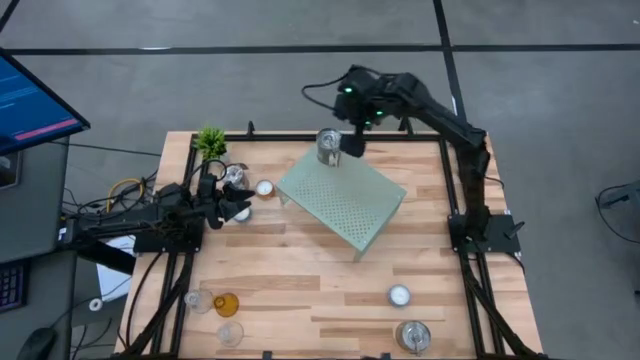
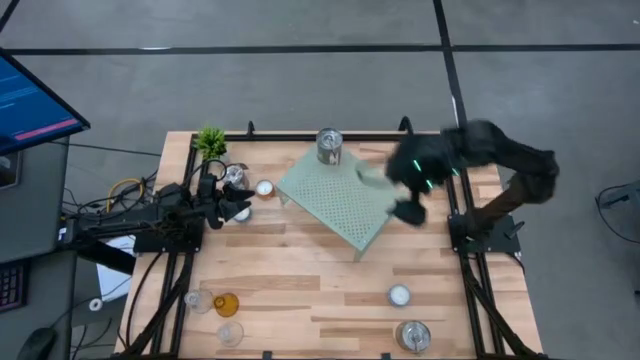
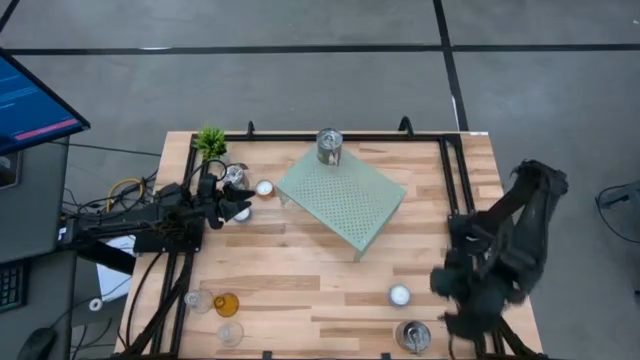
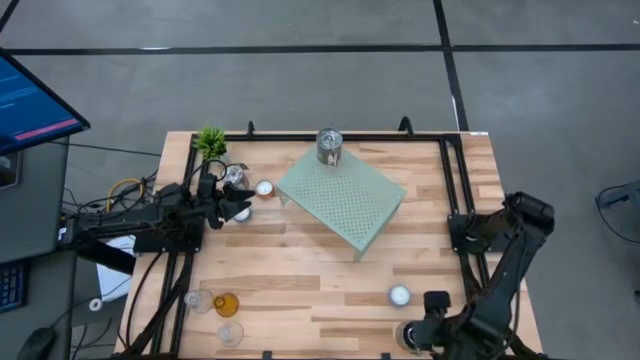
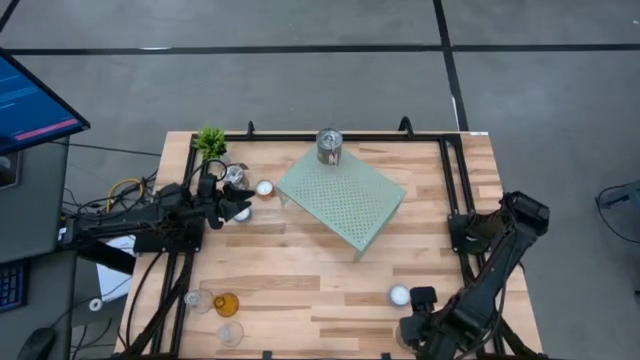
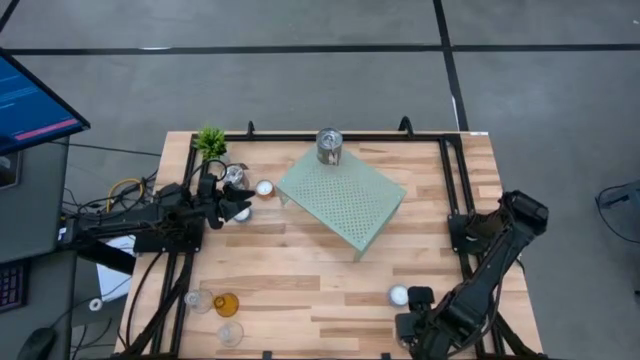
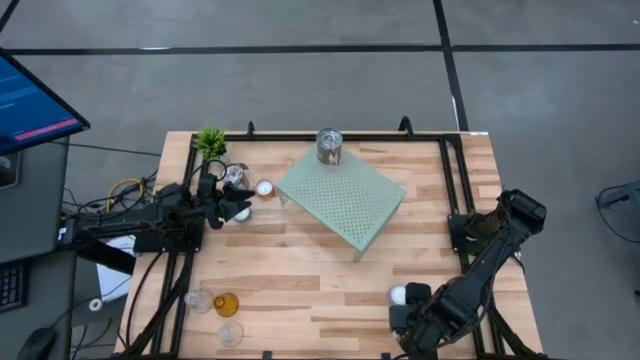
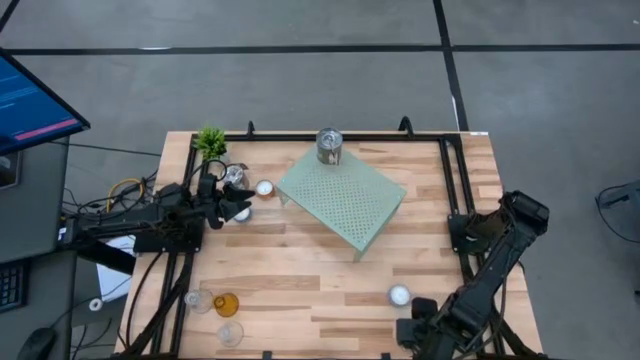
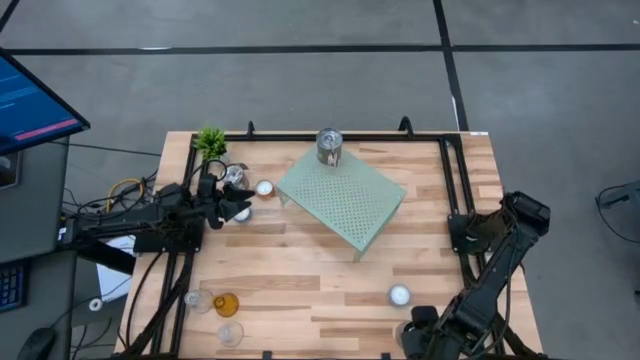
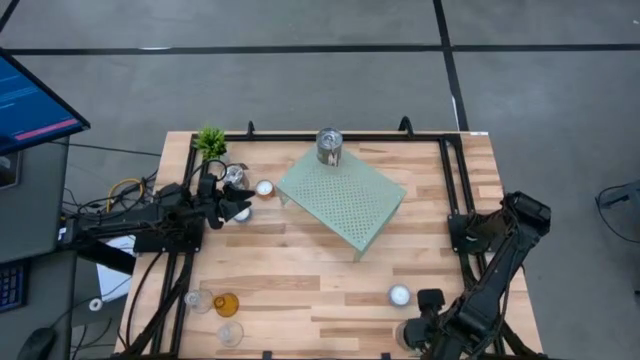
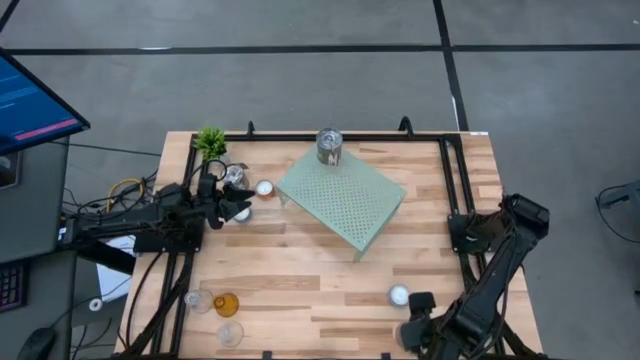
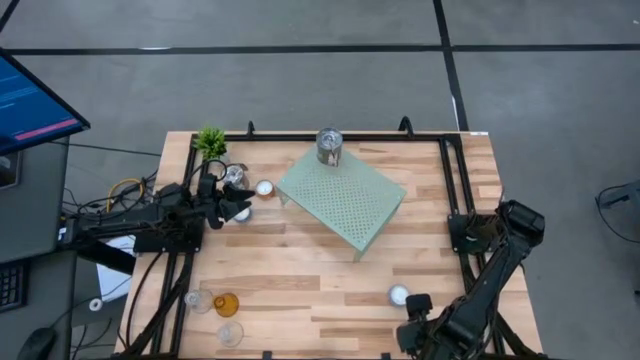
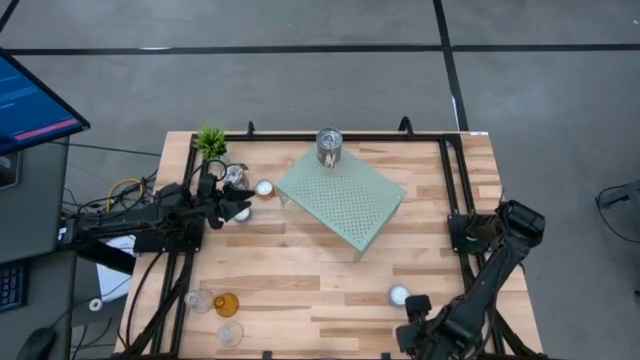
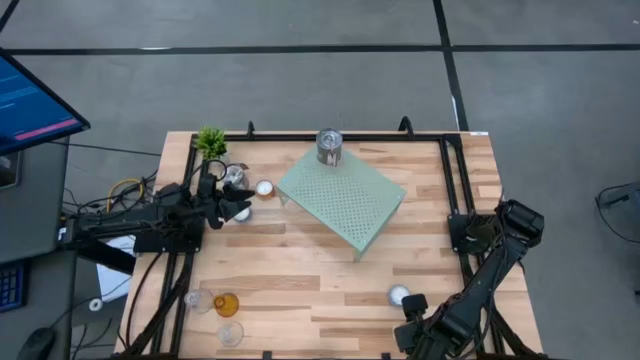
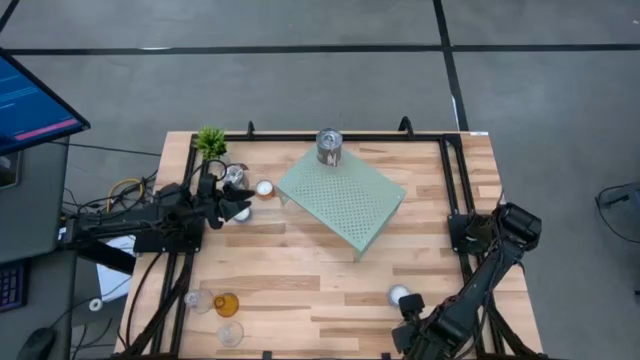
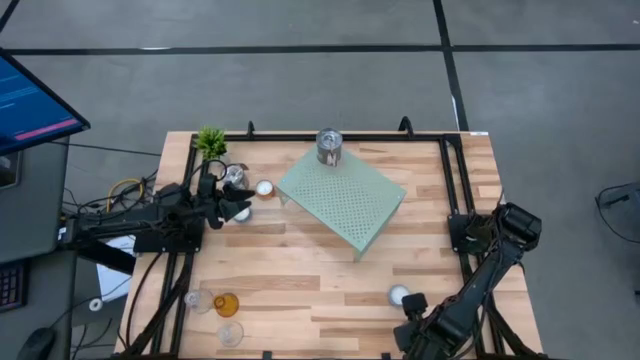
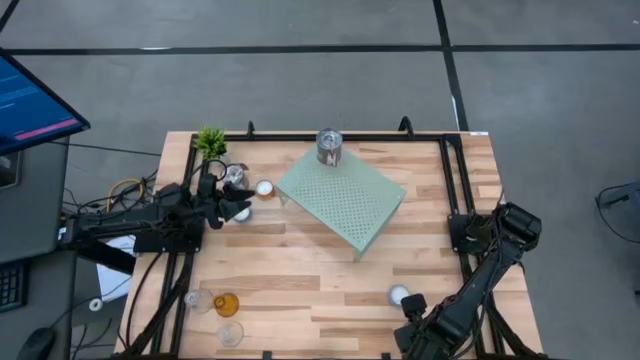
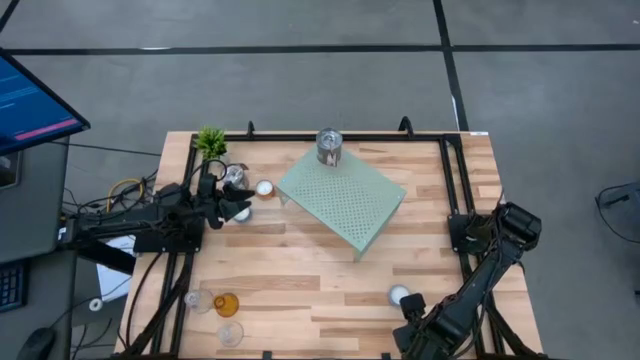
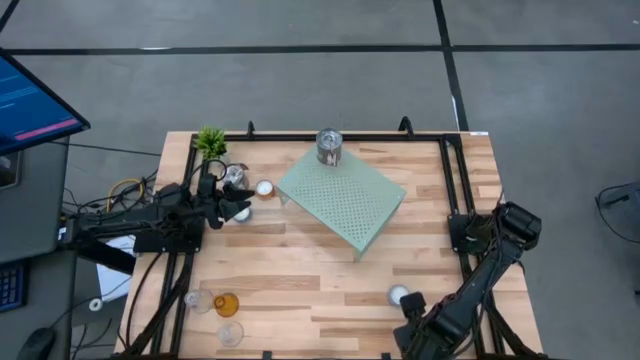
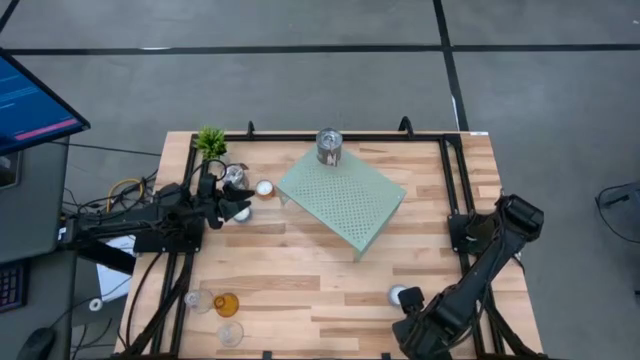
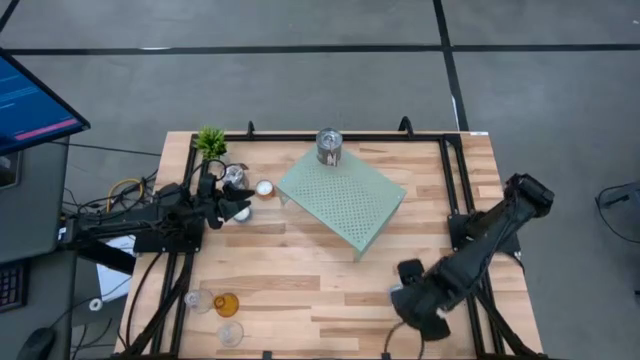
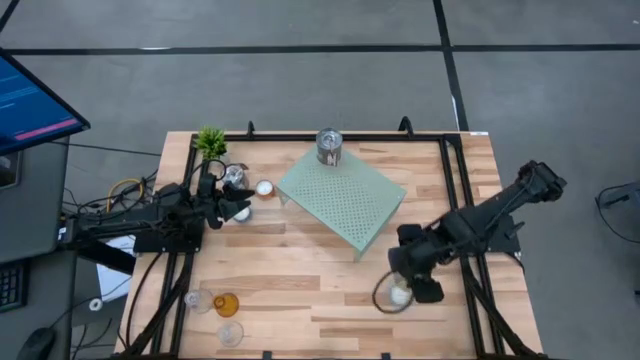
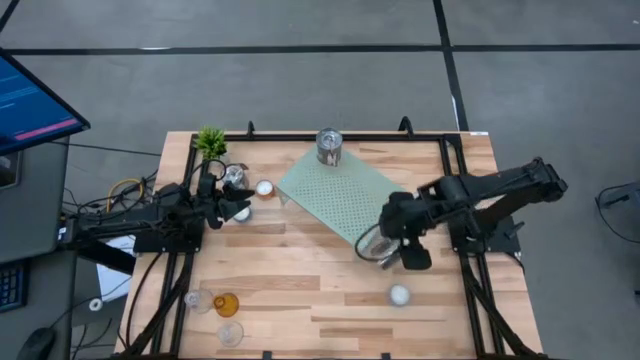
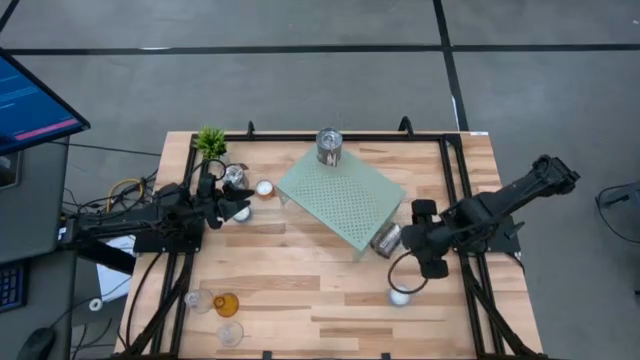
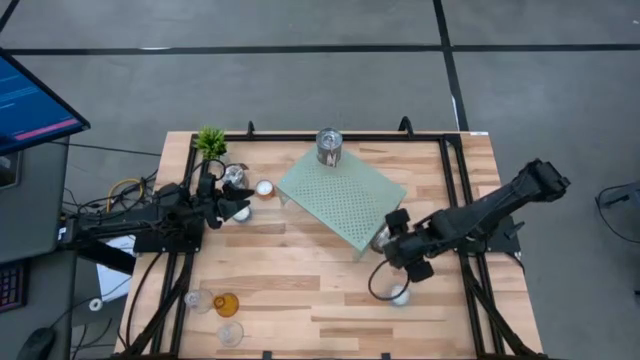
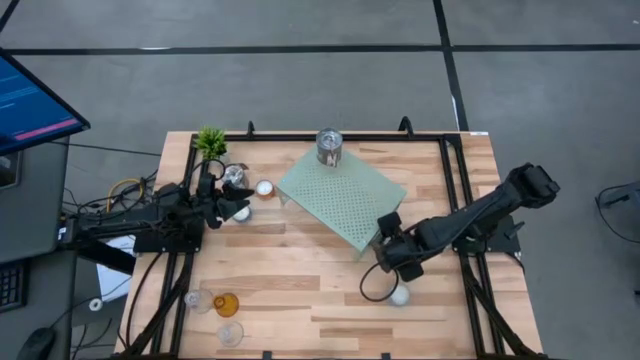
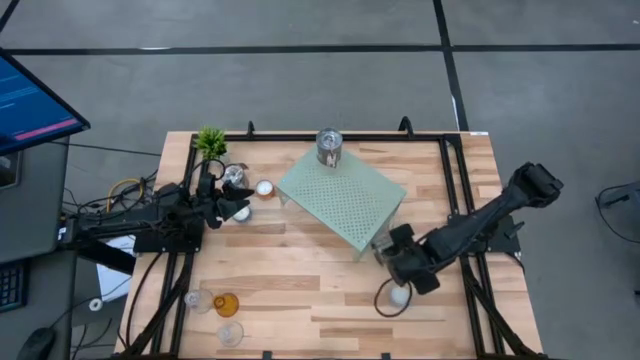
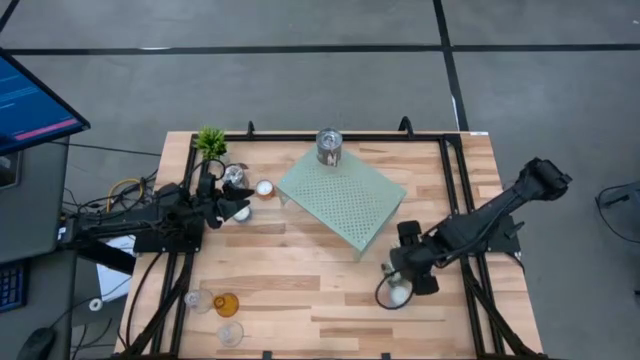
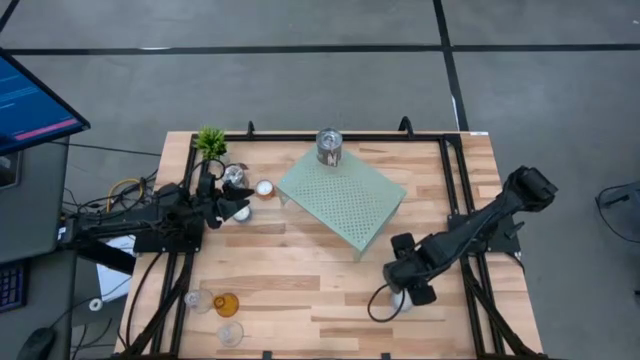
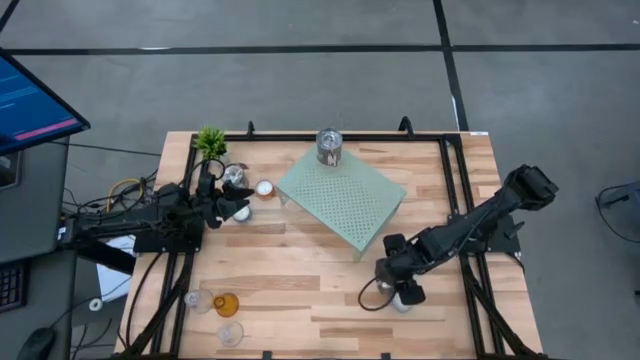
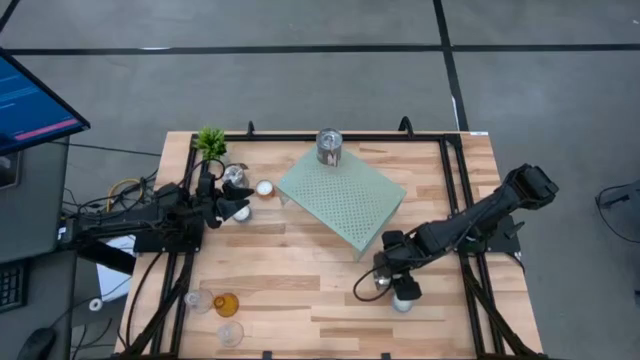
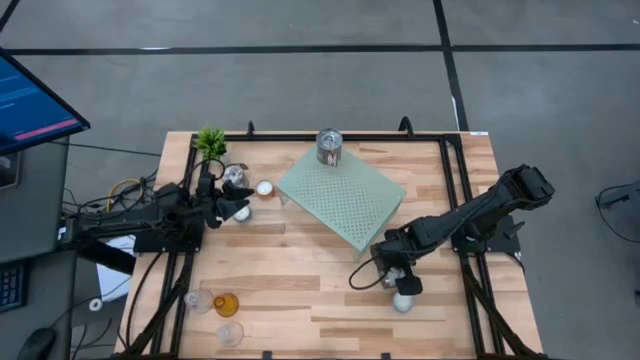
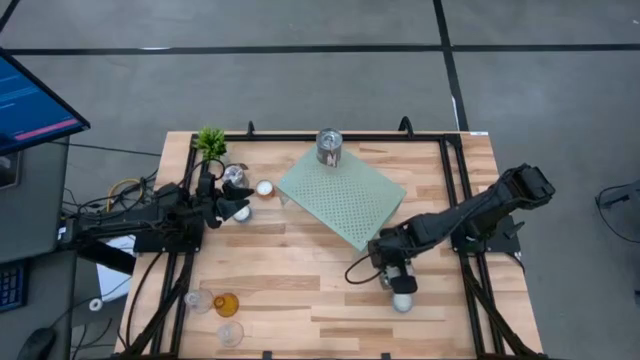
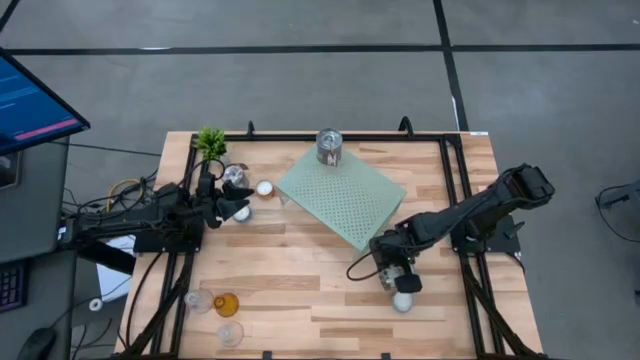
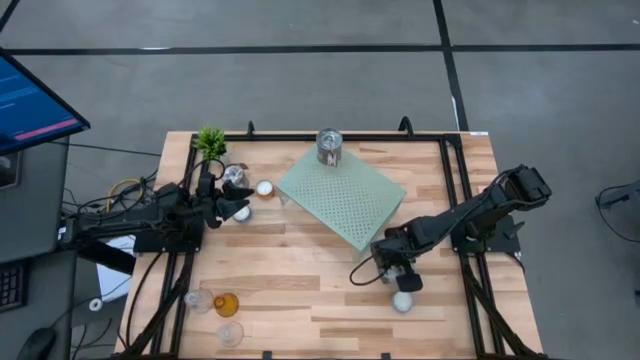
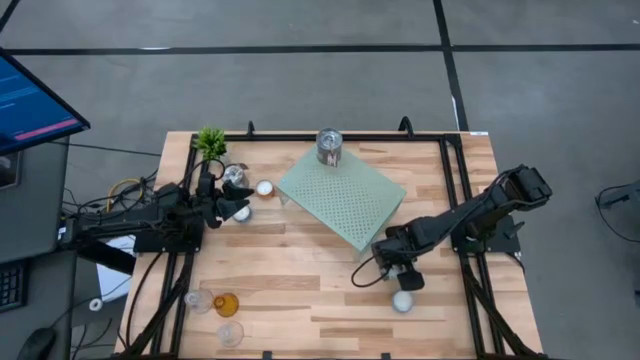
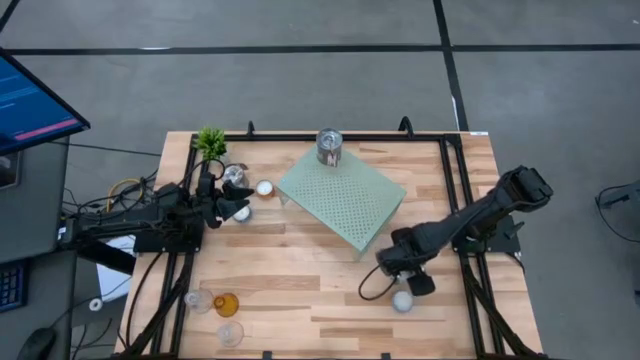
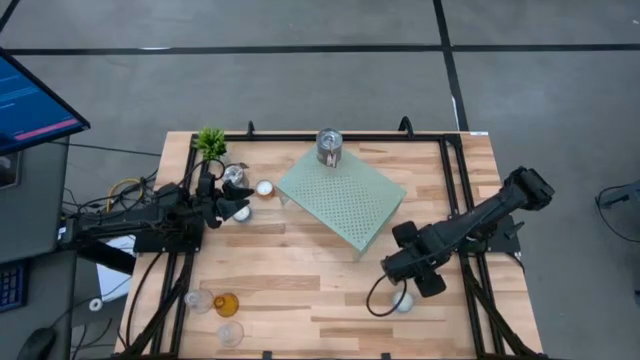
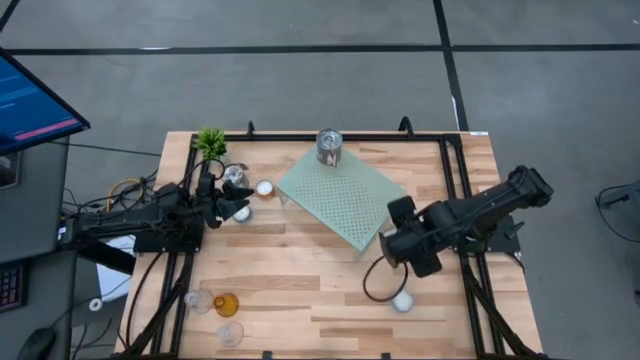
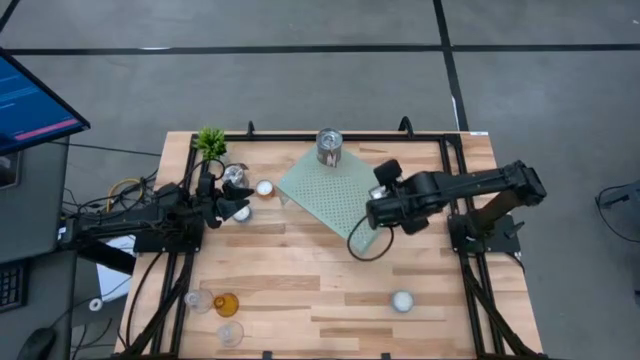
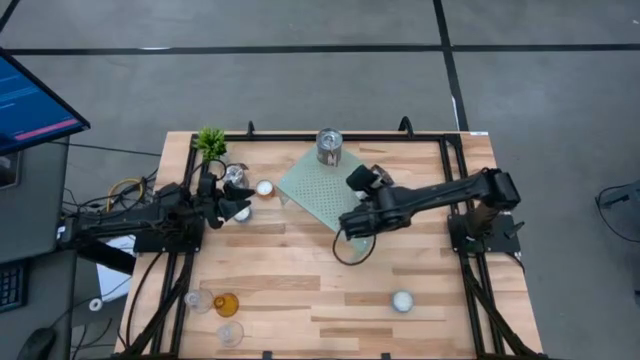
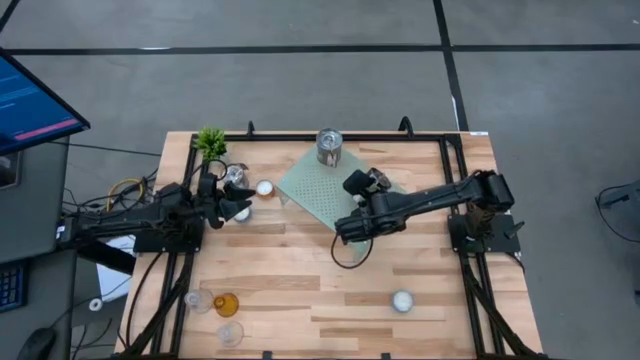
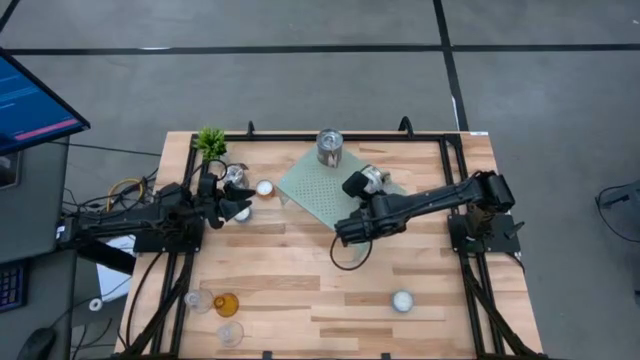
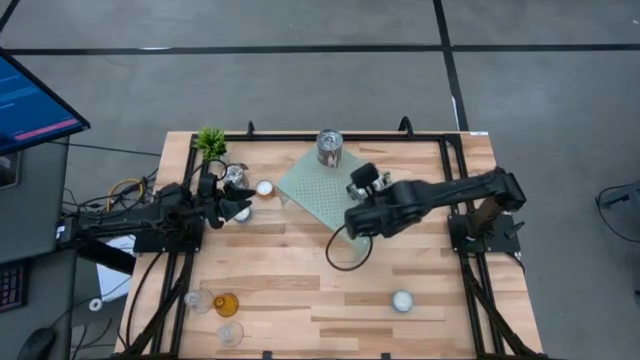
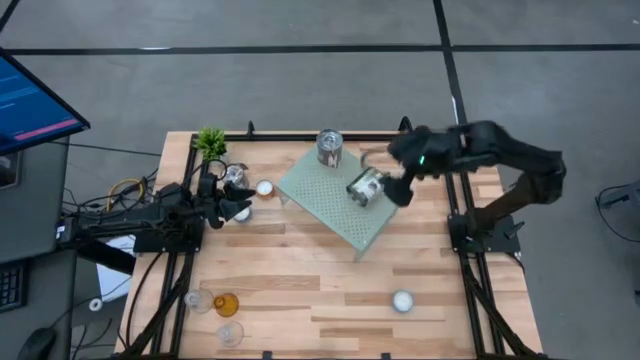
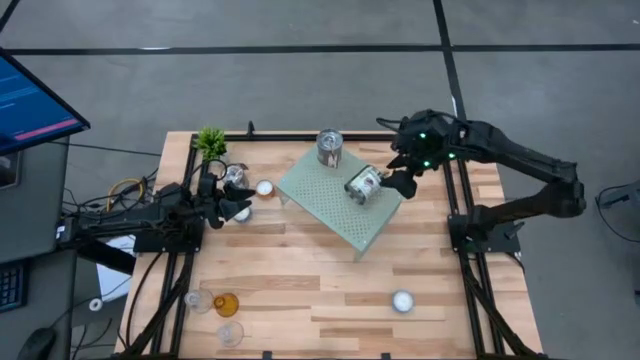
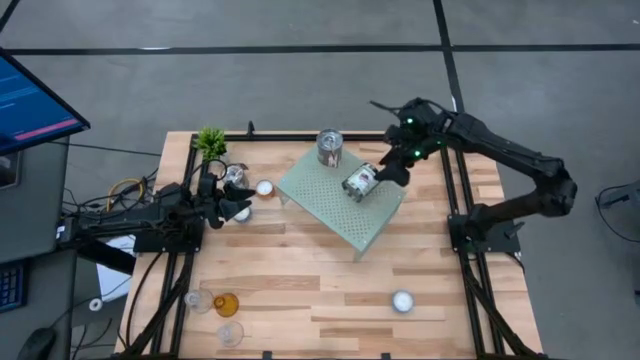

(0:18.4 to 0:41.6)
Task: Stock candles on shelf
Put the bottom silver scented candle on the shelf
